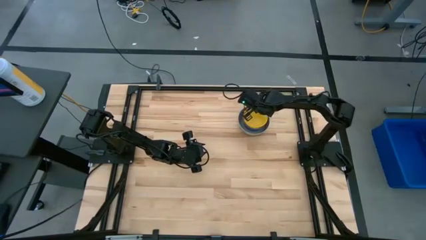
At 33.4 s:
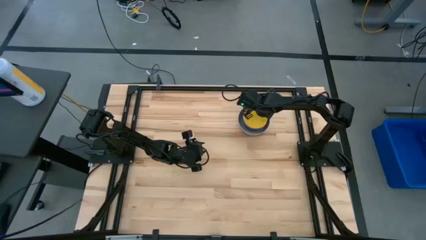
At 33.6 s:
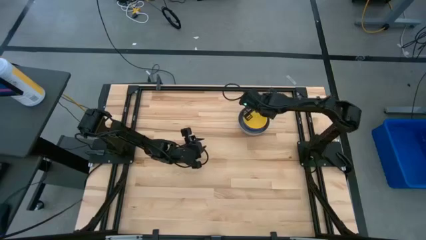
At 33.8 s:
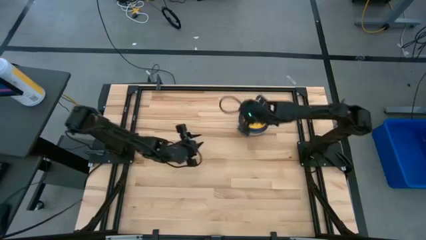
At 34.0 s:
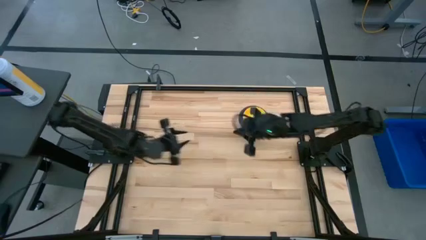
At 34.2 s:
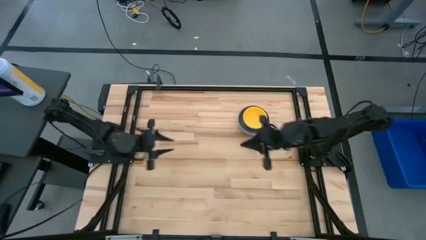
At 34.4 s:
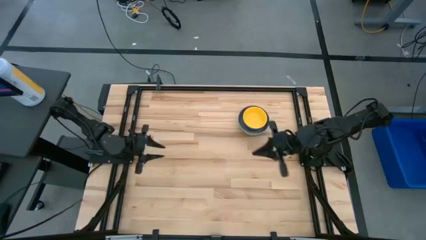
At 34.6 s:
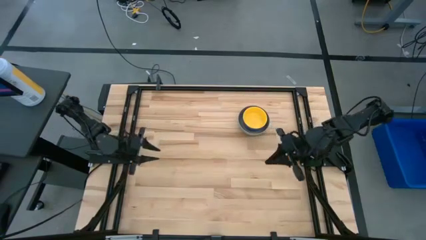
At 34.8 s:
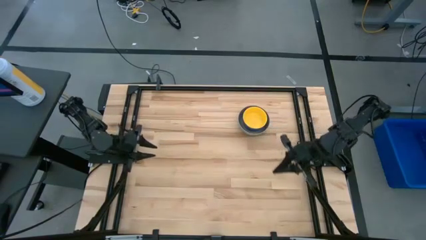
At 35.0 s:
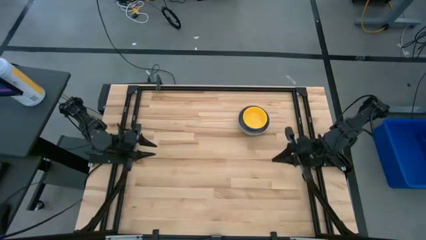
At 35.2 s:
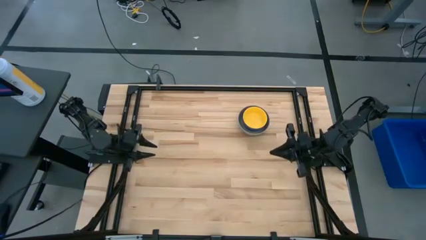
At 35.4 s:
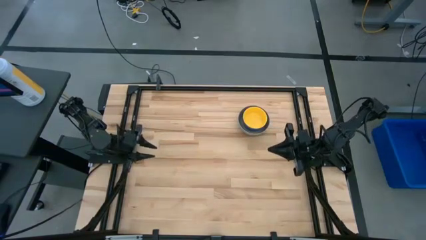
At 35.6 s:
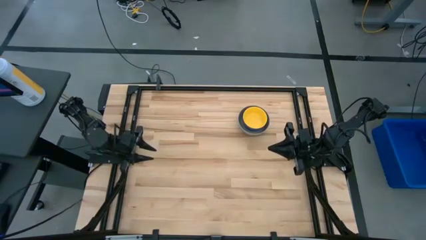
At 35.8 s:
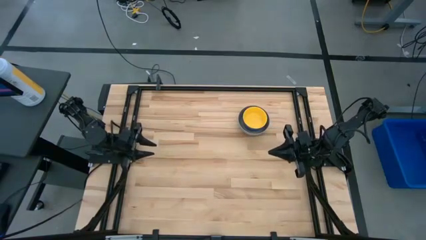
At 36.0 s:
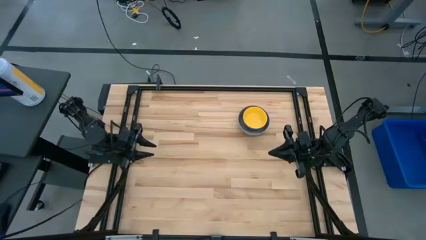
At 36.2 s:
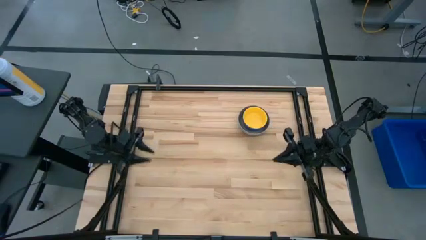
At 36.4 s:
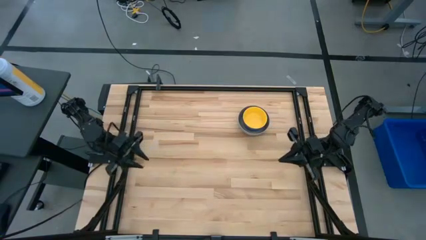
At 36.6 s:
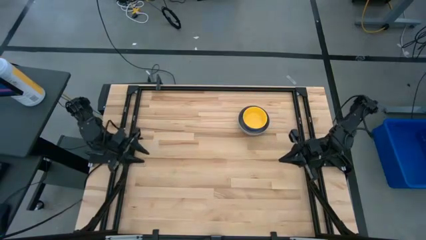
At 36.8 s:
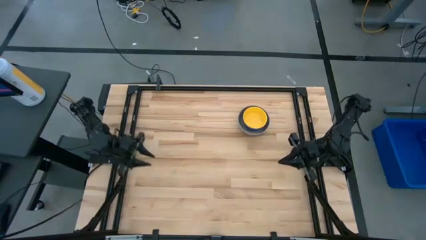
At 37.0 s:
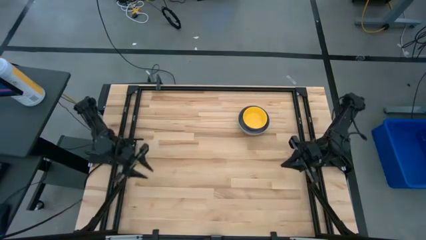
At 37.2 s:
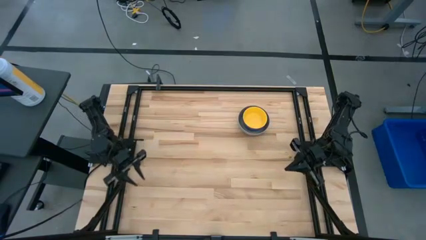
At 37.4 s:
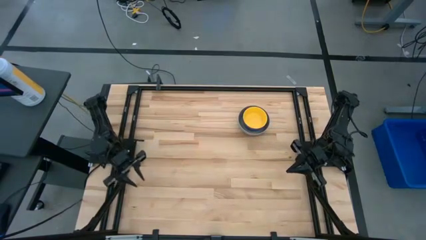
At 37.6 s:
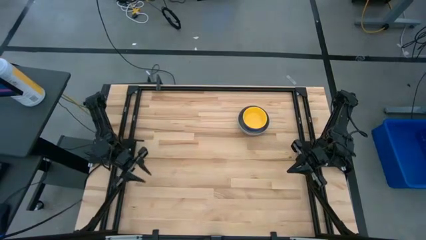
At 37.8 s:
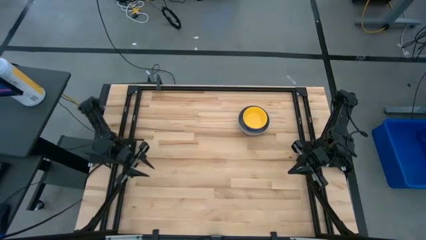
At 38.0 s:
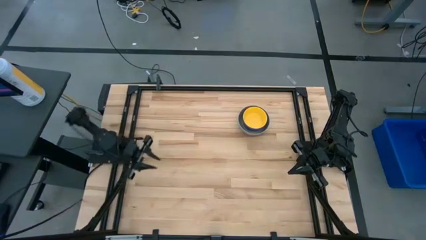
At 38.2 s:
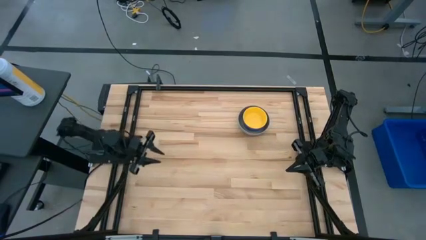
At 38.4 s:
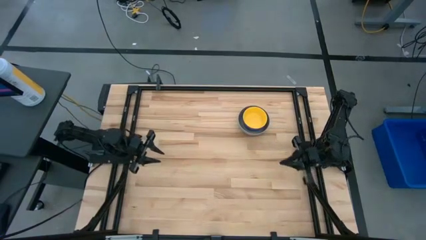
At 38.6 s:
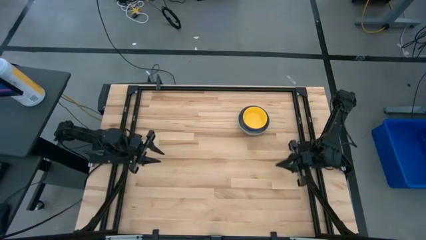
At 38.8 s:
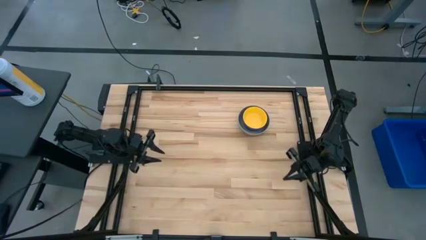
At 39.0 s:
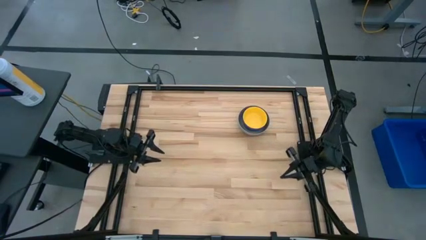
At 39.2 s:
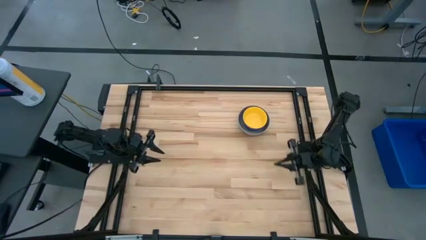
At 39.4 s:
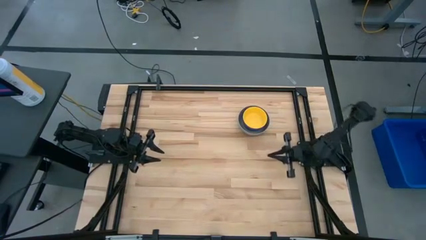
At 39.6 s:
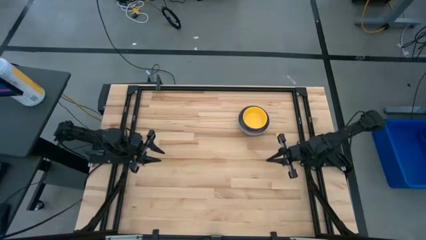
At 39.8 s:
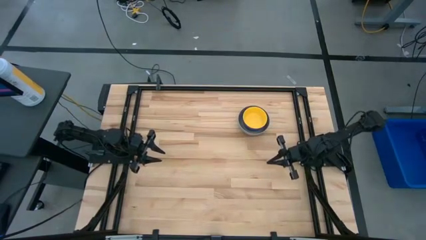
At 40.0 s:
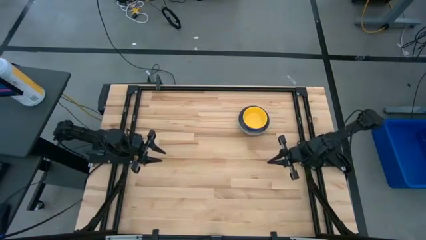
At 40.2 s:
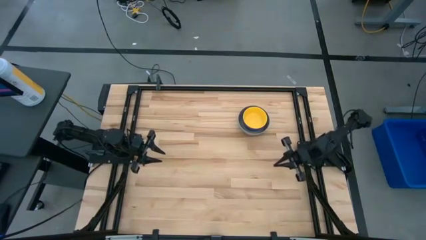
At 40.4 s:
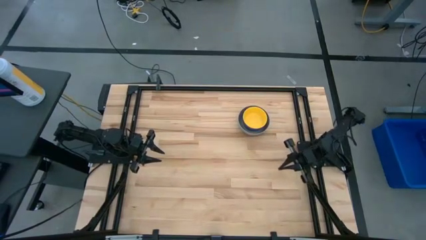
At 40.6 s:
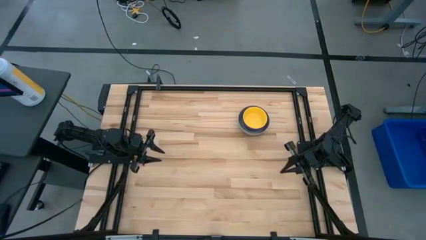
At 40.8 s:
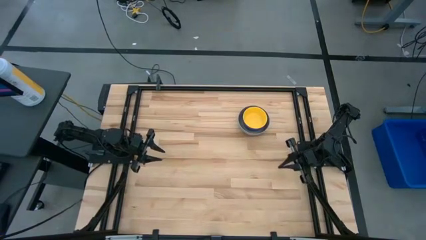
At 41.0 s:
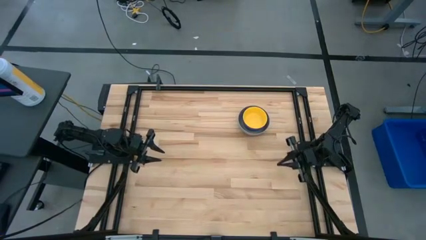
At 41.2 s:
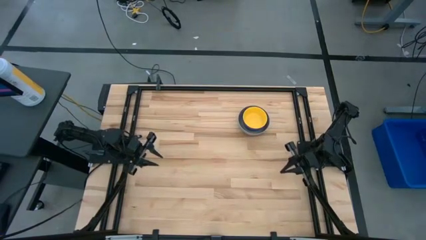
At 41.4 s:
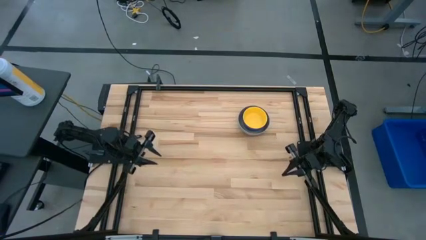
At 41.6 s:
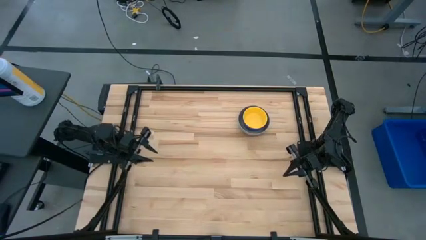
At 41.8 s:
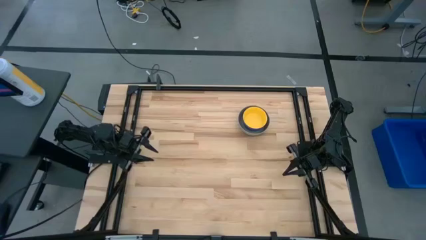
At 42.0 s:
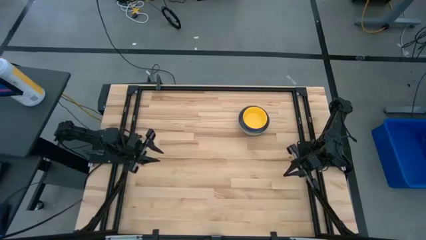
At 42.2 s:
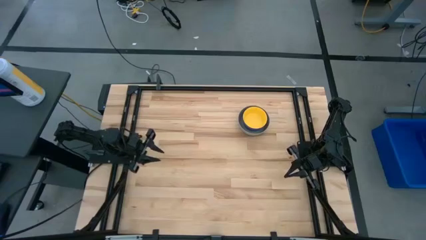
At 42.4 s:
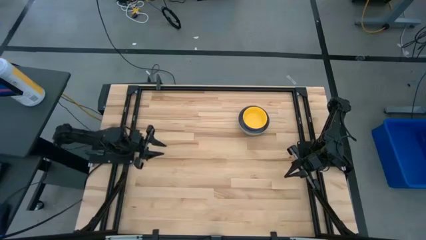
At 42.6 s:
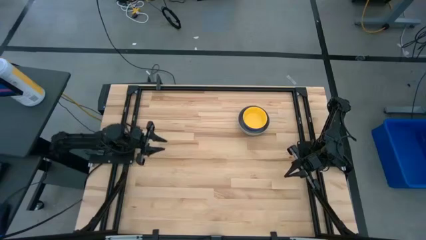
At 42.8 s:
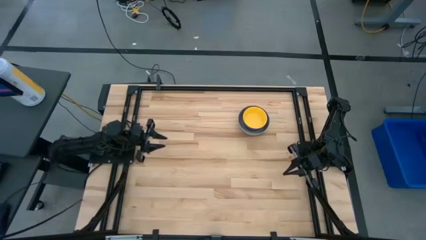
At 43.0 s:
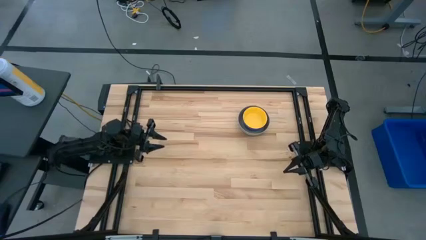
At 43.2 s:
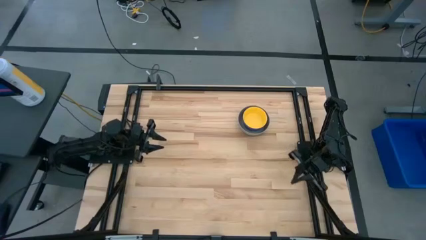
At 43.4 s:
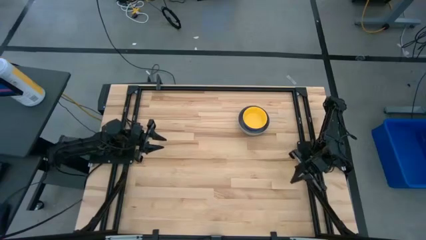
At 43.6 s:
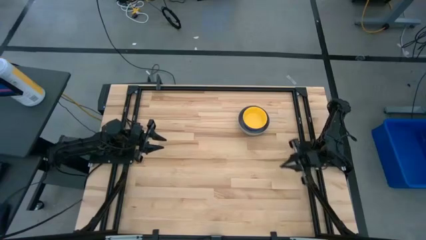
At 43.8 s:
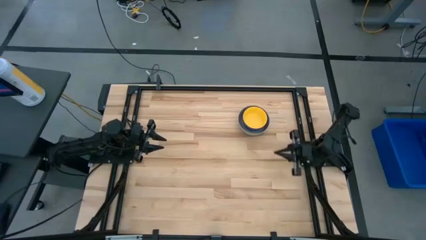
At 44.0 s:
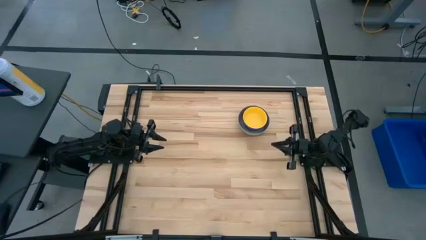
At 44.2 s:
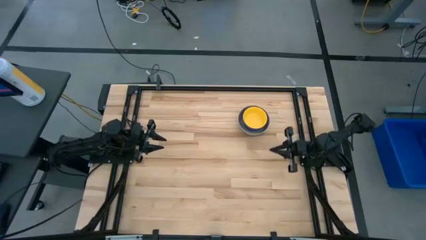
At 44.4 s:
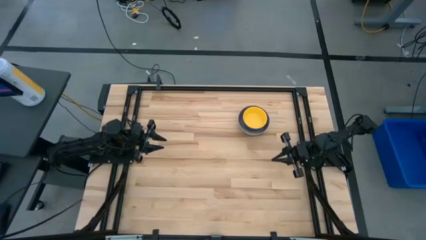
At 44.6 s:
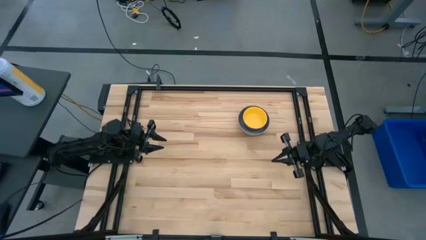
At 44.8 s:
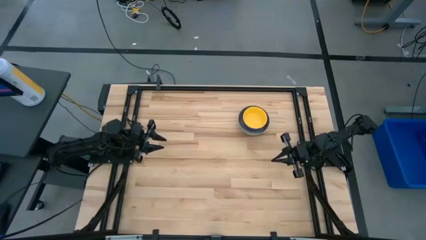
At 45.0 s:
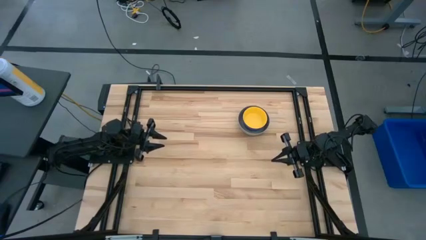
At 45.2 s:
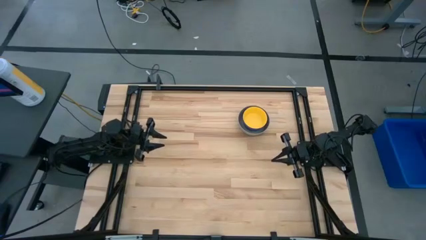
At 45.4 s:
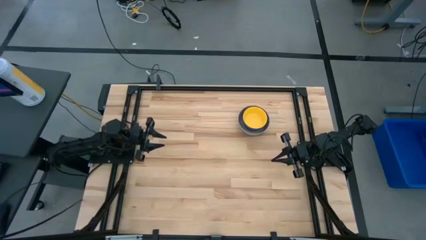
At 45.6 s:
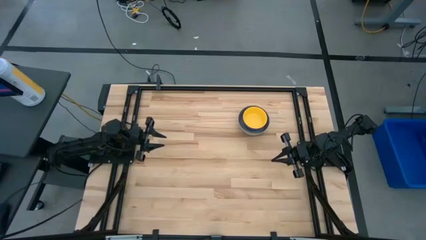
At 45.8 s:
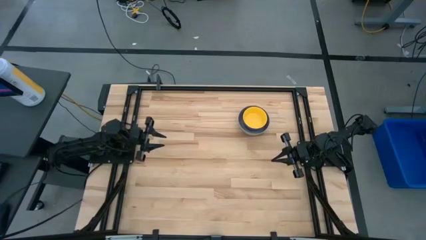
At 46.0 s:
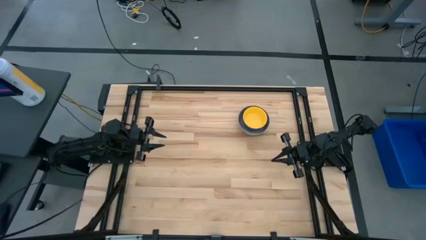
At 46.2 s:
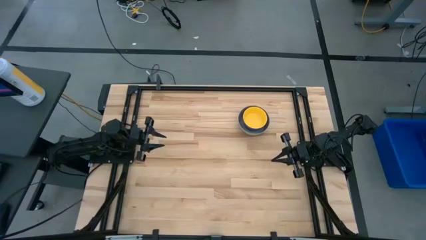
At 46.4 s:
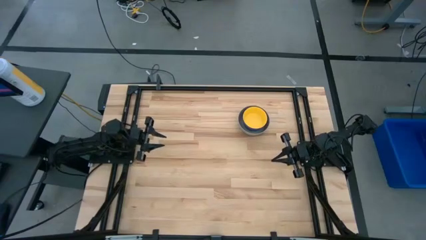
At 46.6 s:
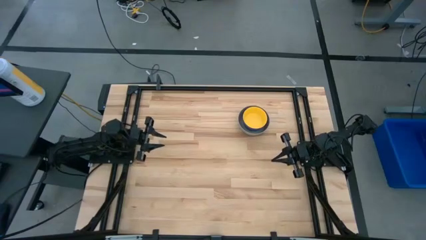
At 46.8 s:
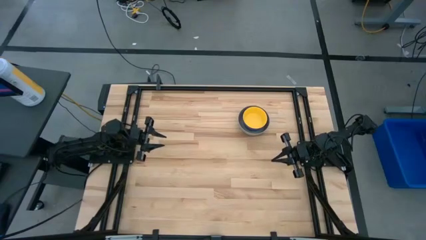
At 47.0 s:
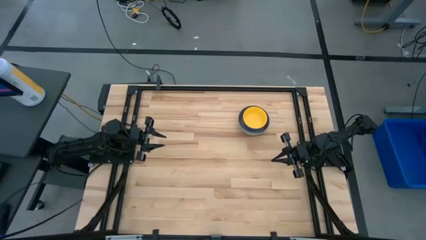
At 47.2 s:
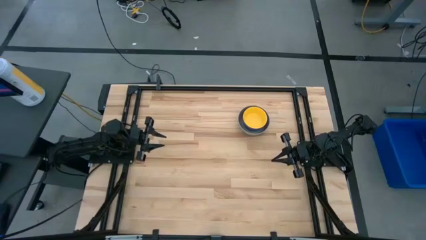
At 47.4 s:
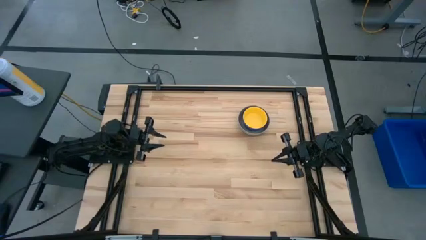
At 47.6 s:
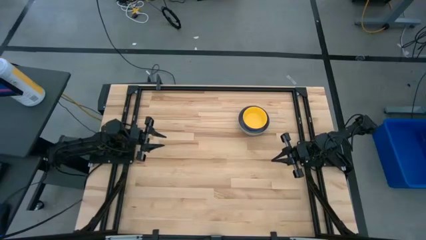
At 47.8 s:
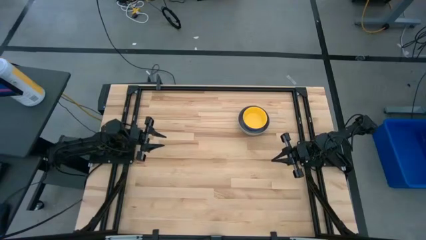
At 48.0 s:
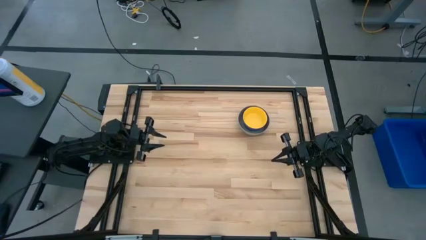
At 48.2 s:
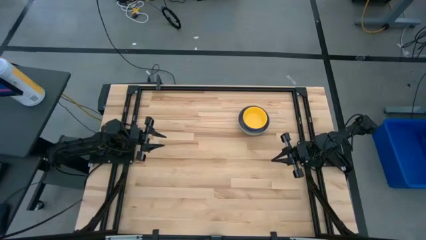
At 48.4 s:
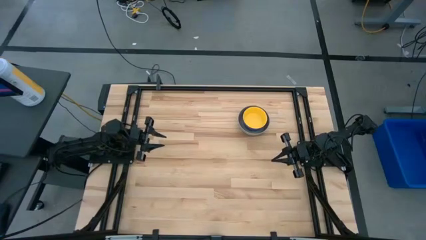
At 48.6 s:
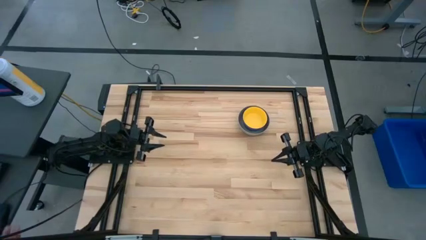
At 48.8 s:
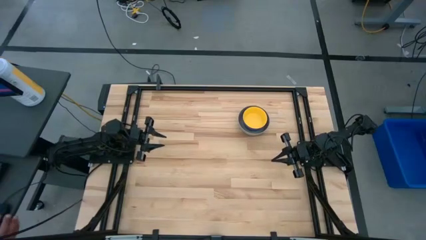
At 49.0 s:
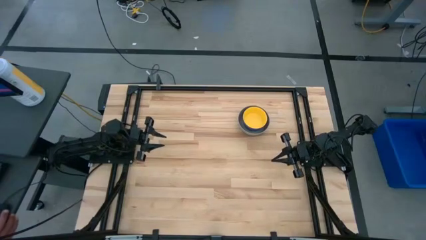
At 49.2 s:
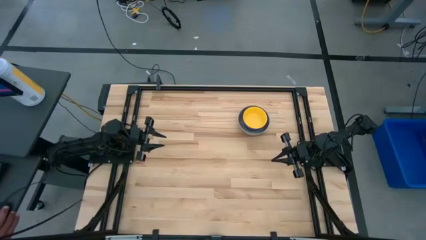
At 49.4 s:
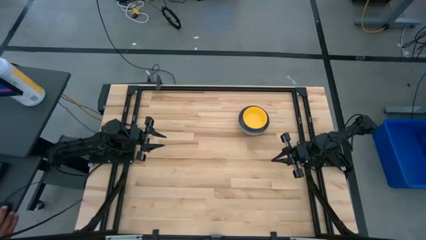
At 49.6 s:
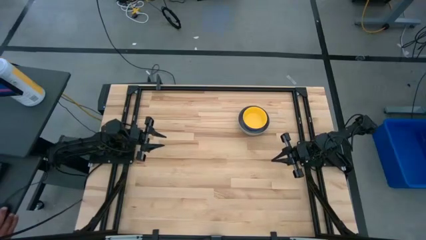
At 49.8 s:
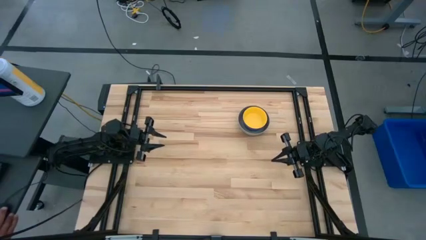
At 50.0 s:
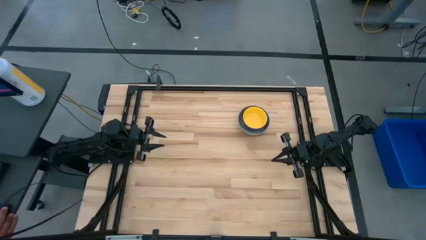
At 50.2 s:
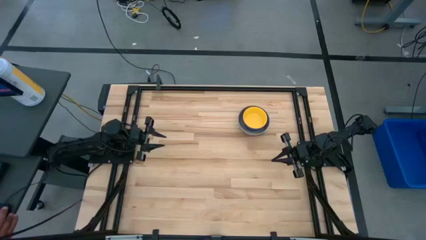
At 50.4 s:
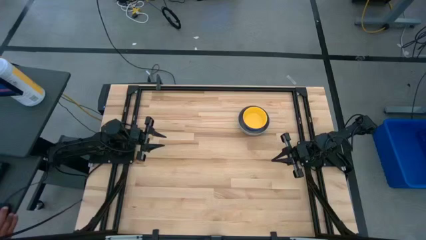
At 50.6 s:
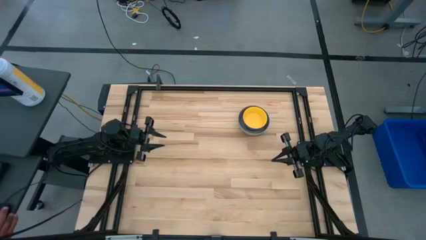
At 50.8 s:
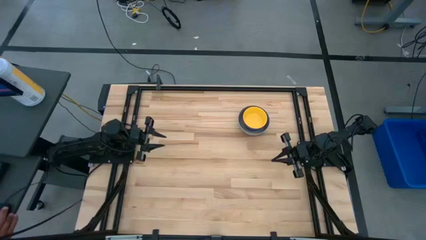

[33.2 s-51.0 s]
Return to Home Position
